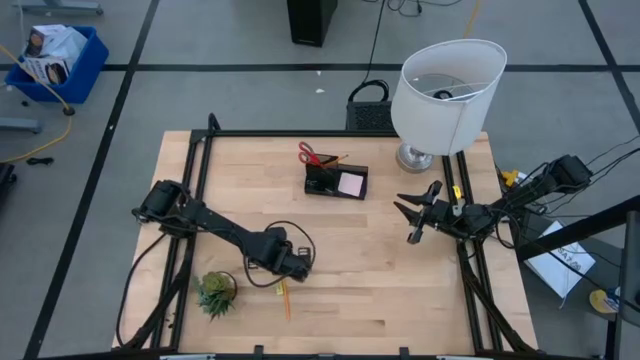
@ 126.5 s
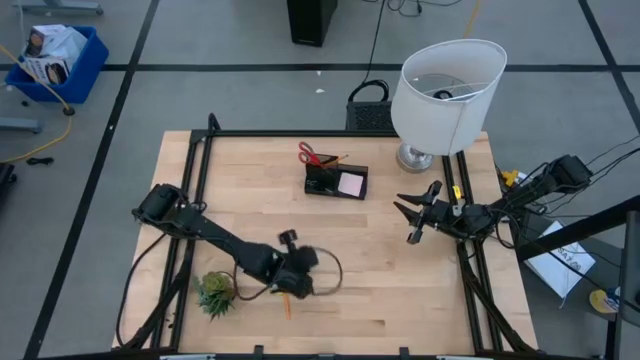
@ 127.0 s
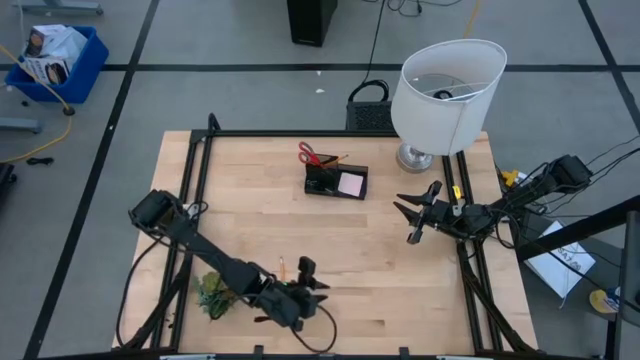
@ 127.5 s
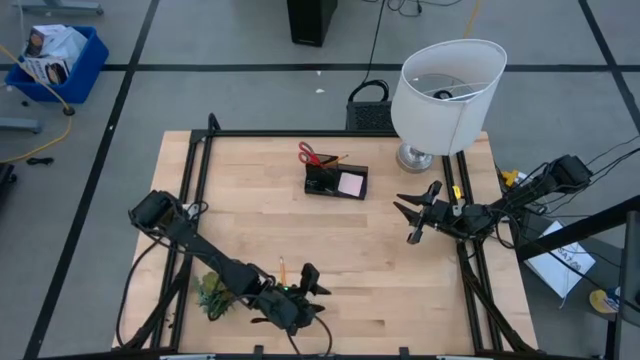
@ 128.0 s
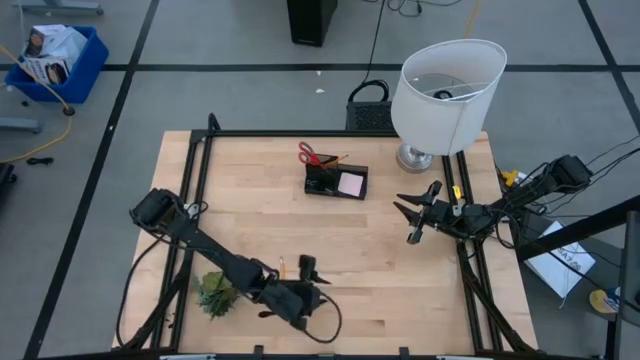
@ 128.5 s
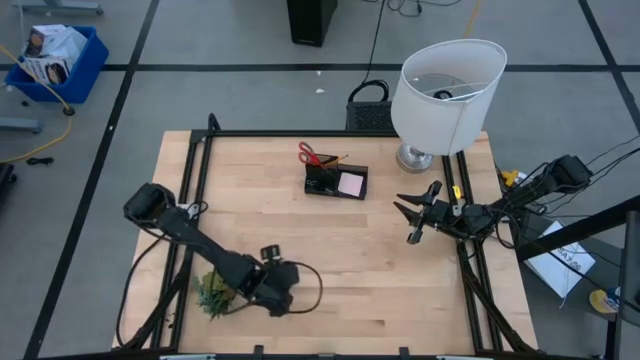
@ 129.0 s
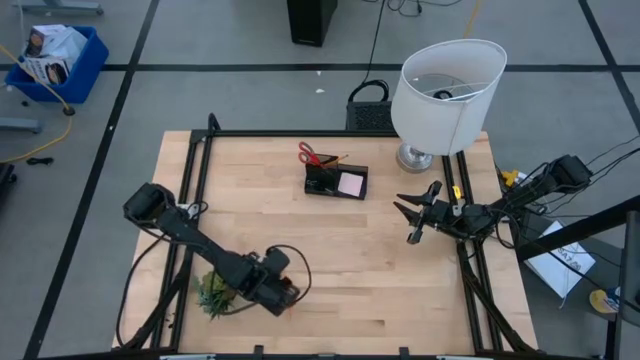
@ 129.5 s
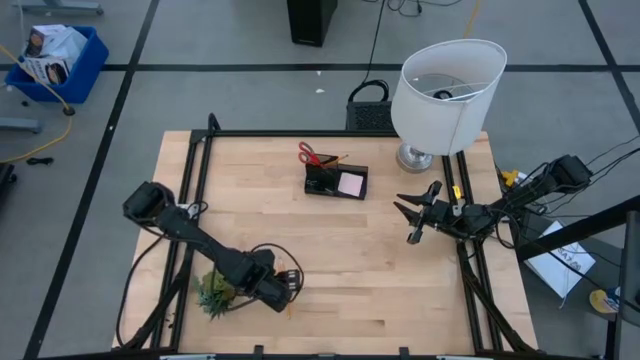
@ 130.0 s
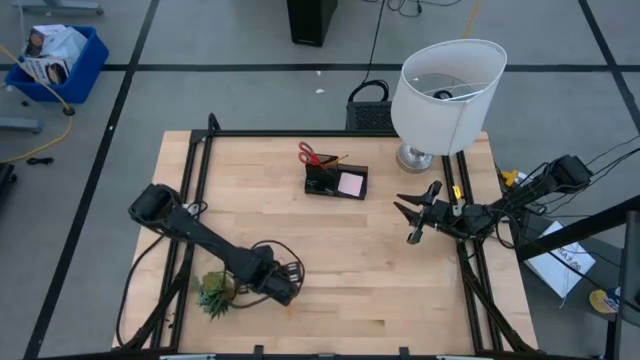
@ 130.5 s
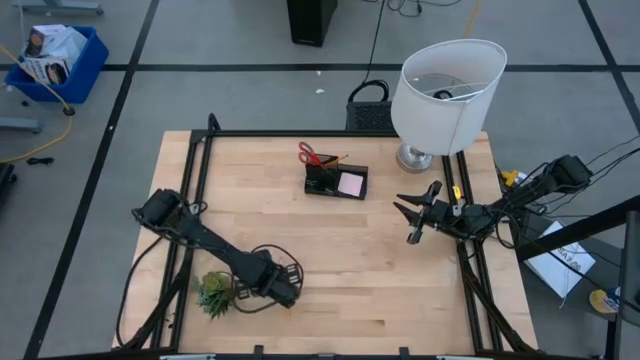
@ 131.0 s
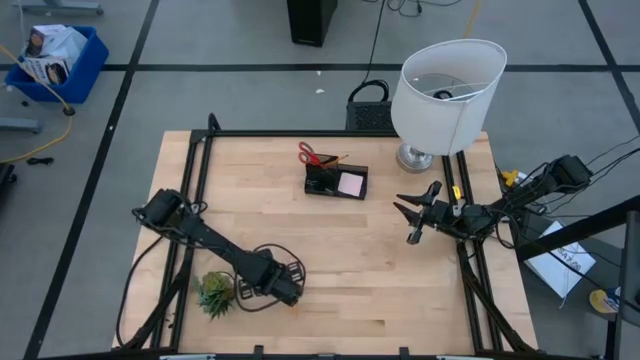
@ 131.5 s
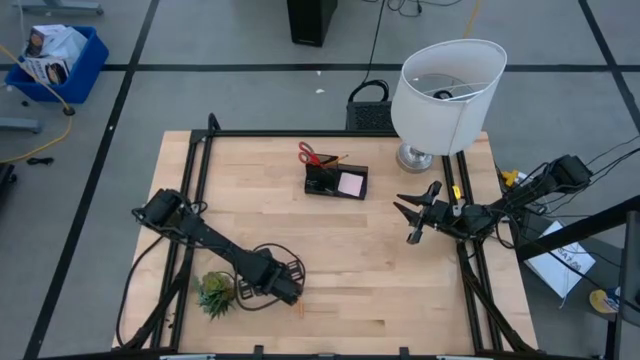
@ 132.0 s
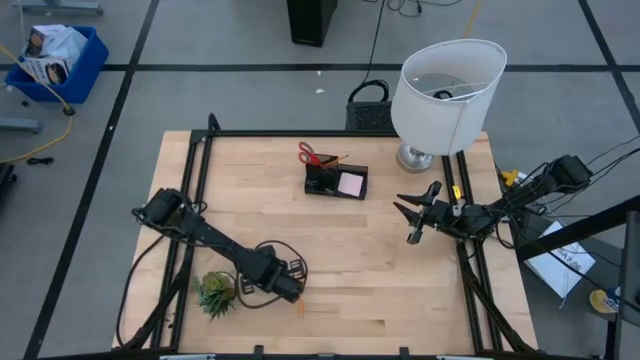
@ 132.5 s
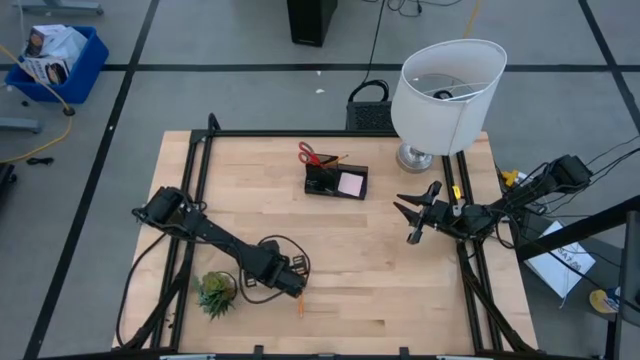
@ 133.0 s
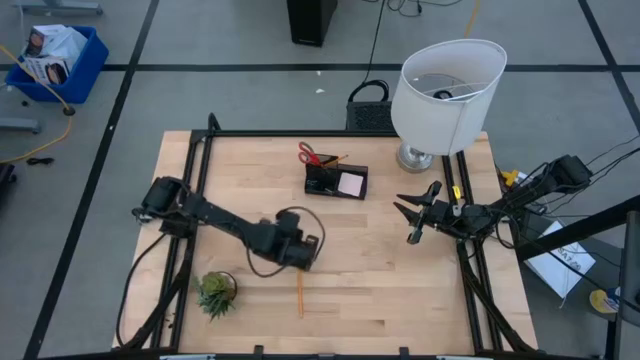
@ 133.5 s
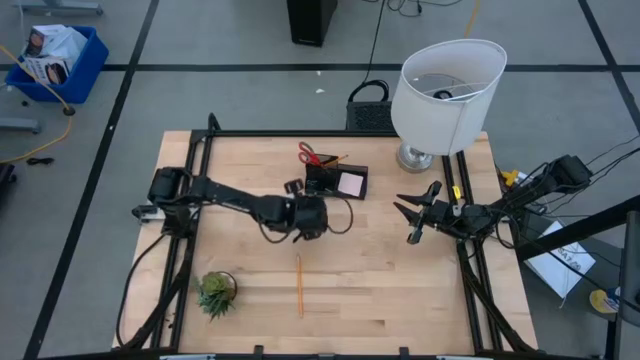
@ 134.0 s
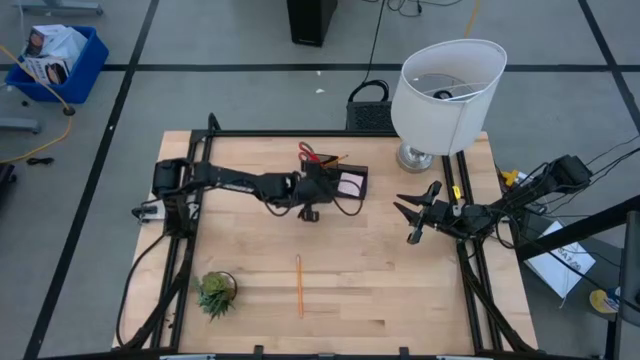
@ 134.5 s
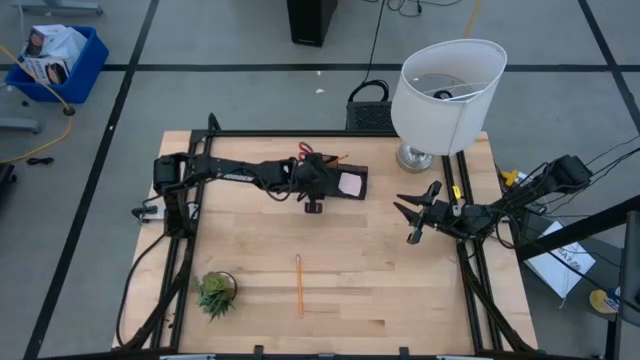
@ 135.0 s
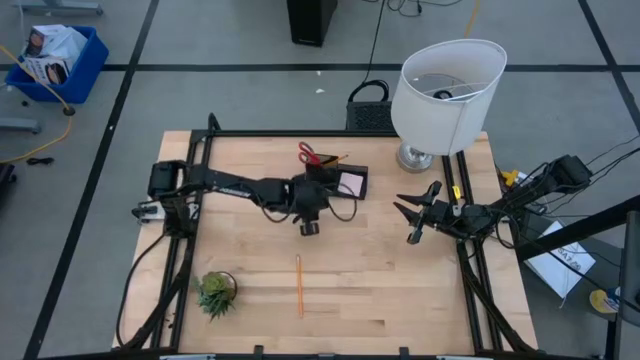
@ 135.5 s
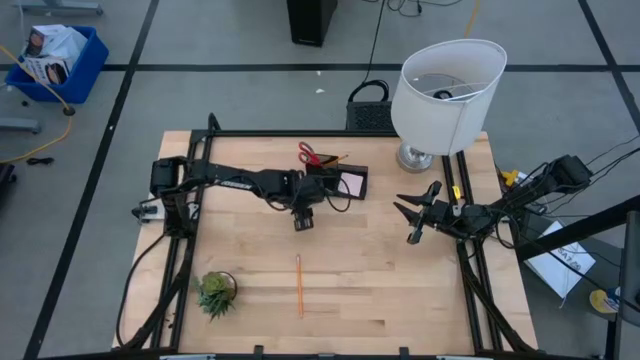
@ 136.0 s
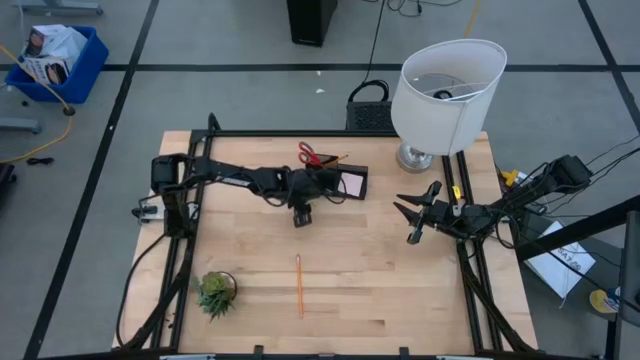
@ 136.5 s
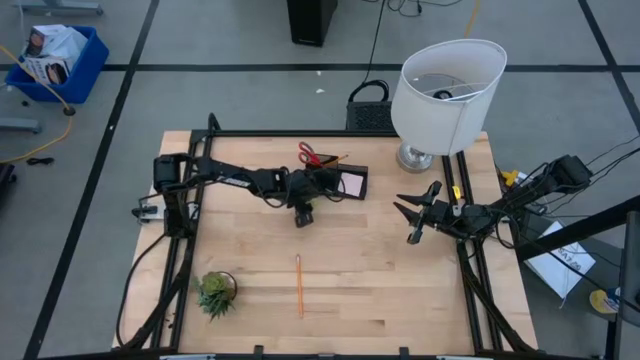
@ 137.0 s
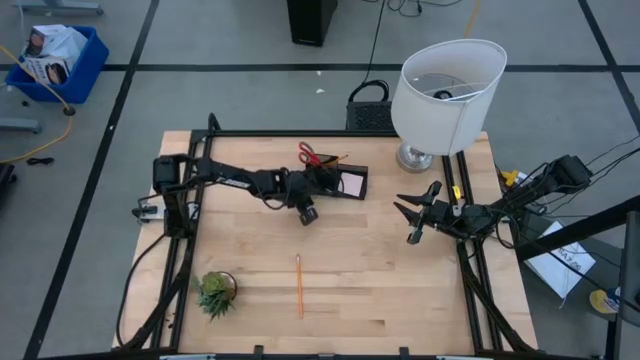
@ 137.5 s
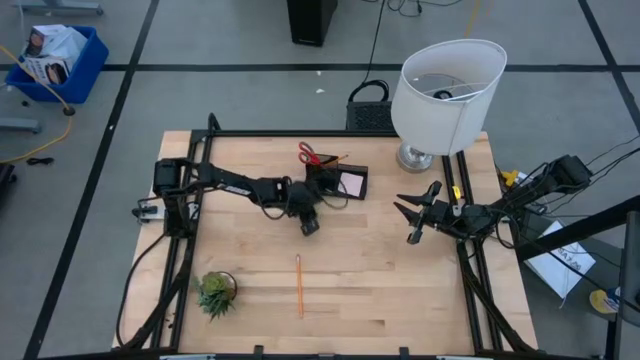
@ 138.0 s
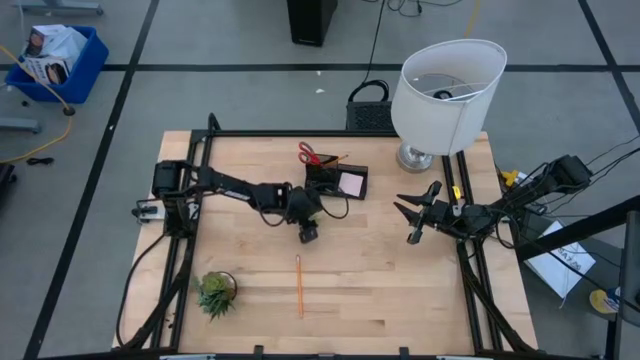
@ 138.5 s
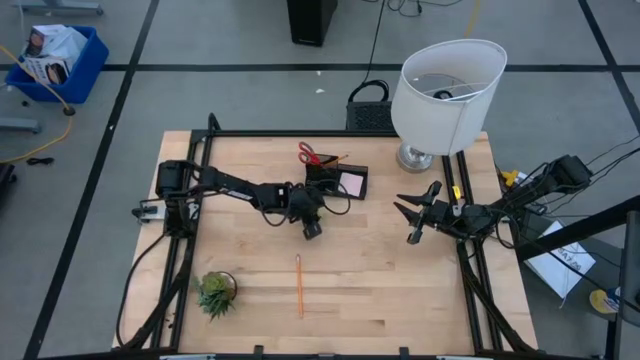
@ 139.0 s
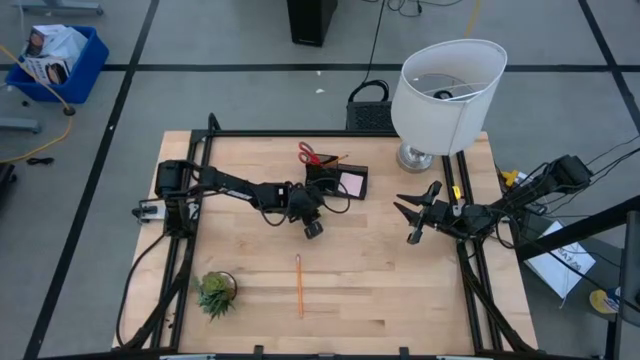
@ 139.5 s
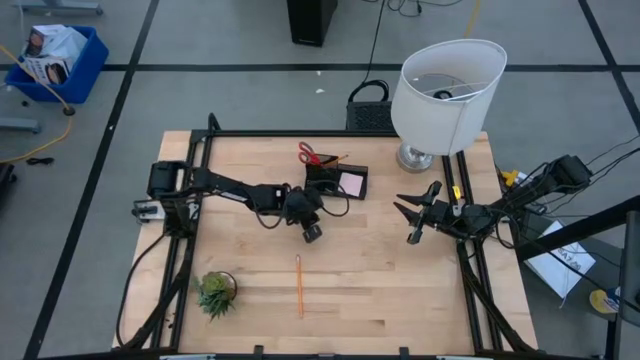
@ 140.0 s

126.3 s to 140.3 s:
Task: Pick and place office supplies into organizer
Put the yellow green eraser into the desk organizer
